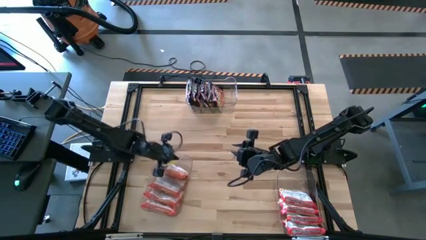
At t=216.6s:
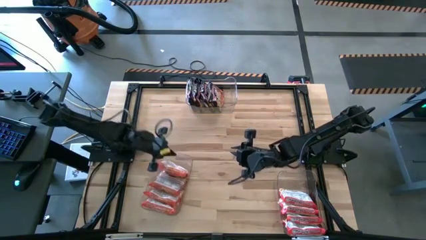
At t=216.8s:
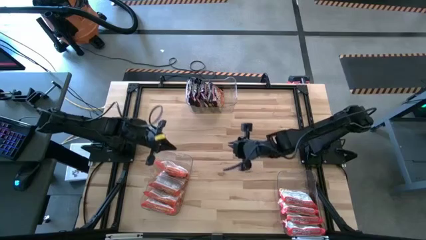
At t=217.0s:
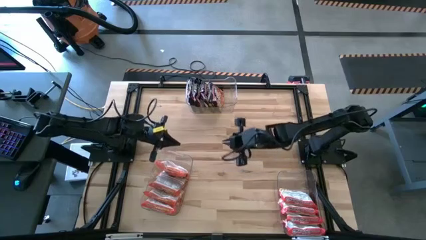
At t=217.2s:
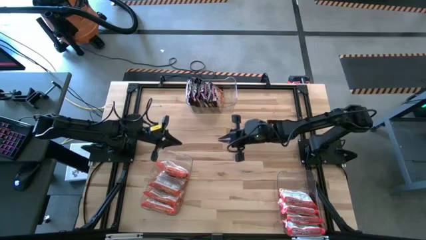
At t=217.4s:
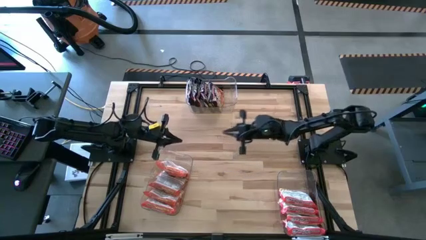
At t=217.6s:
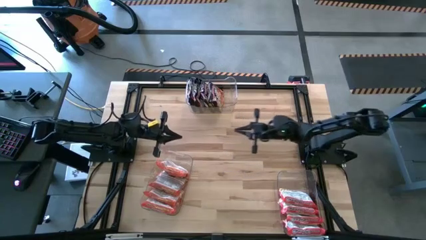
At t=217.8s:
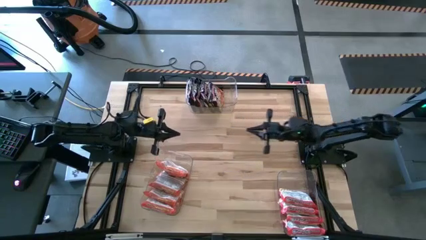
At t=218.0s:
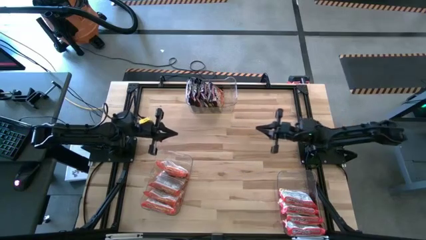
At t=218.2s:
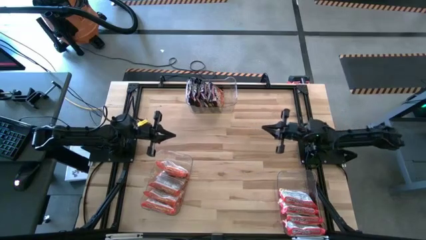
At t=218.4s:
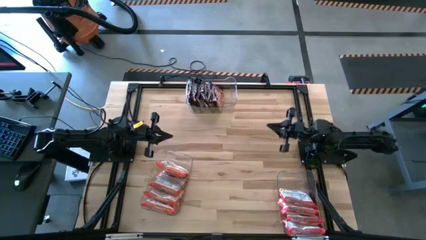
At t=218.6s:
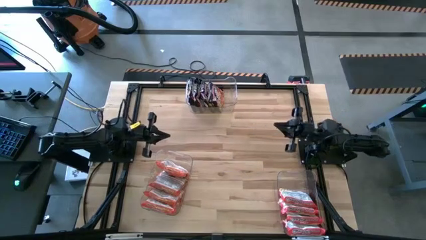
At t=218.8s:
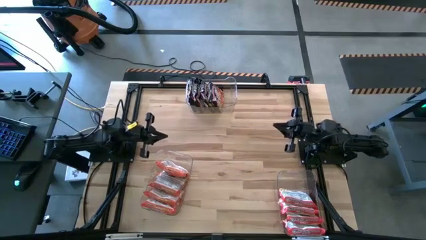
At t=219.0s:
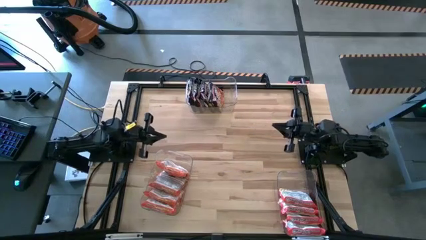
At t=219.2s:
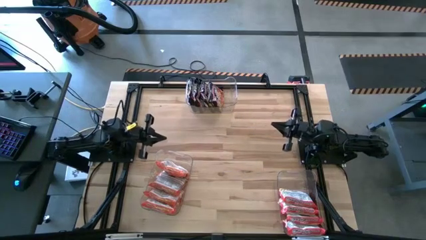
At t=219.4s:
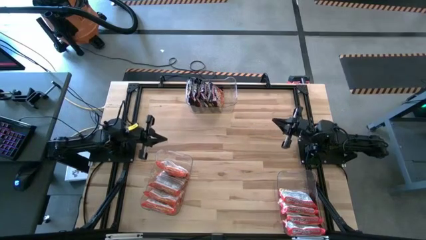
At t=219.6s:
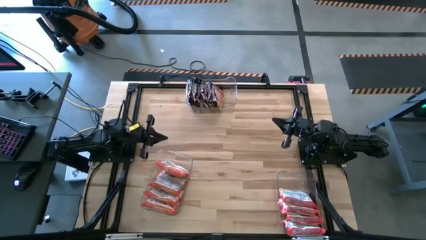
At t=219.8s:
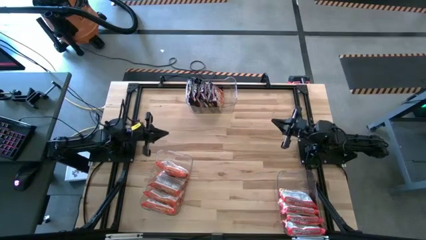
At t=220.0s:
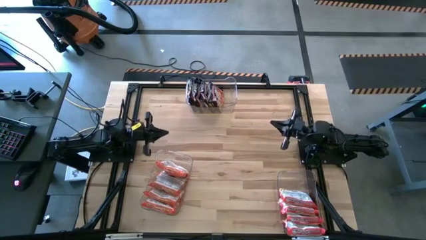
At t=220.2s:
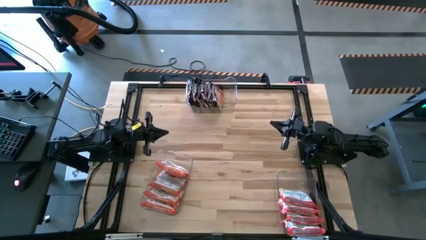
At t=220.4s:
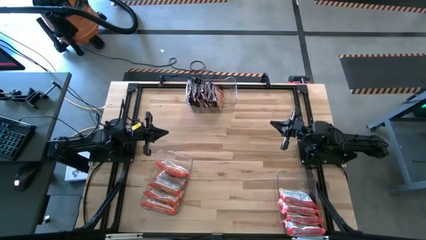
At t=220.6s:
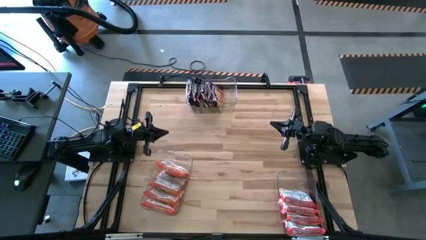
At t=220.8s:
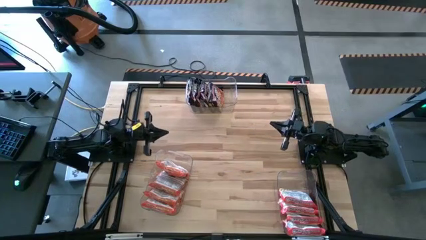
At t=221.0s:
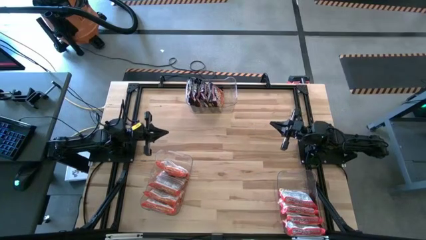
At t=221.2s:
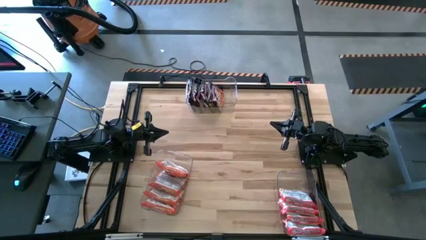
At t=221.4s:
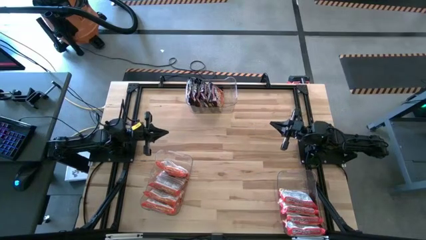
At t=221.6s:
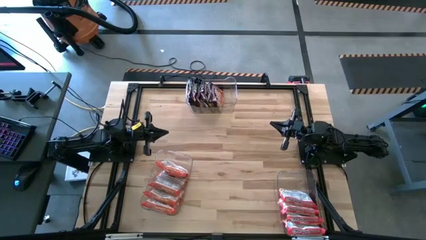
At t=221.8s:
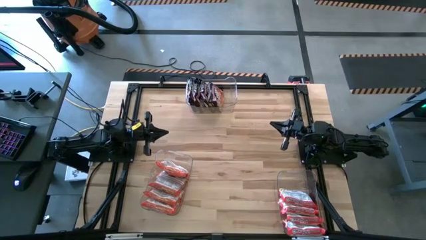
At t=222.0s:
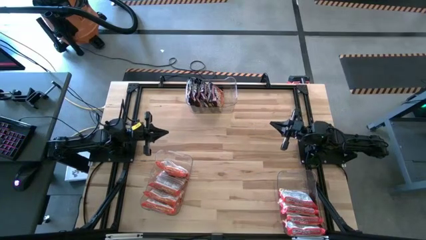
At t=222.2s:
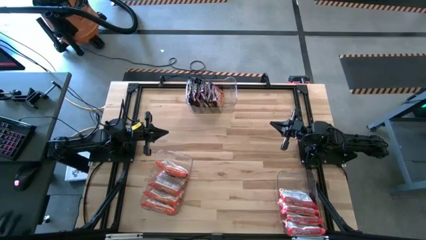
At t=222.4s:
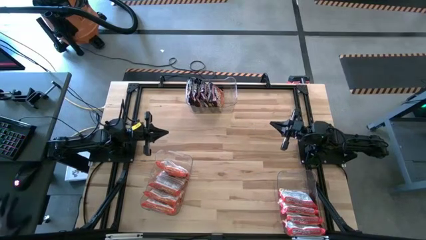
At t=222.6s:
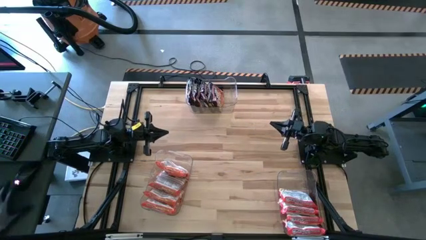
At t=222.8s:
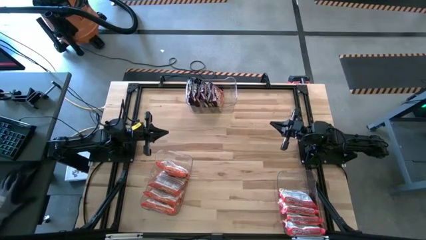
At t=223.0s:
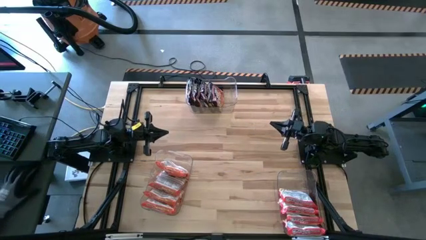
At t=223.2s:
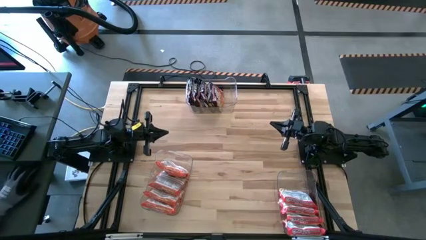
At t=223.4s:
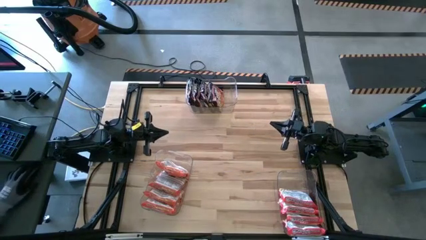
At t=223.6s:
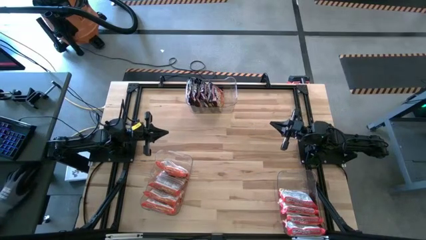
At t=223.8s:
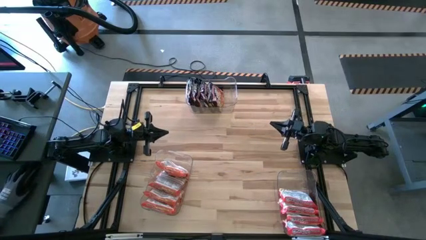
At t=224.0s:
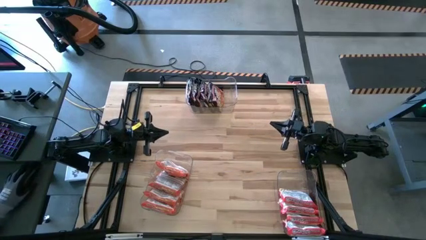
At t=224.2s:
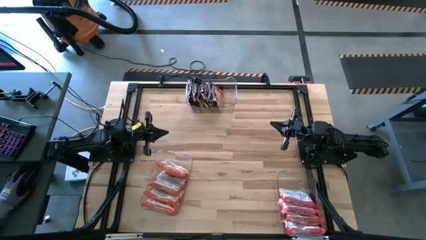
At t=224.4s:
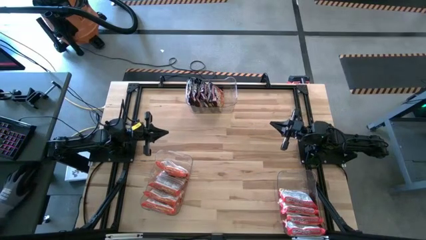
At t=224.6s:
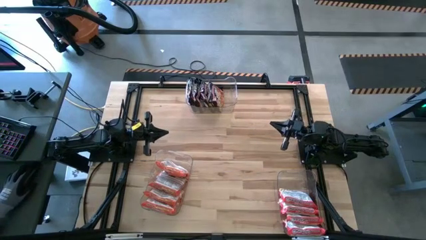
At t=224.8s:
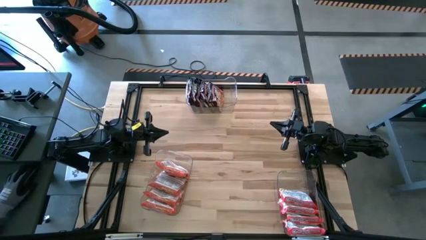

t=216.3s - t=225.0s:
Task: Sort Maruchan noodles
Return to Home Position

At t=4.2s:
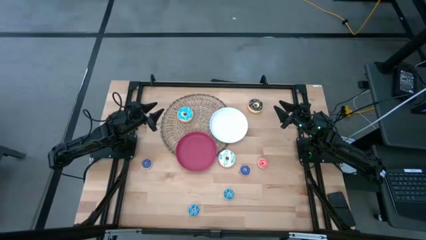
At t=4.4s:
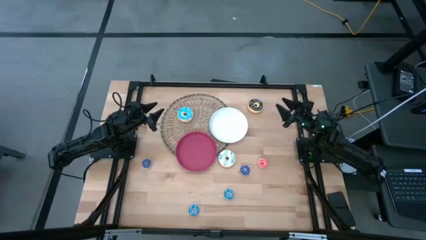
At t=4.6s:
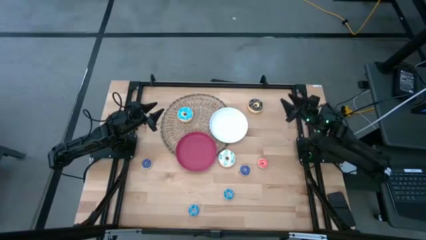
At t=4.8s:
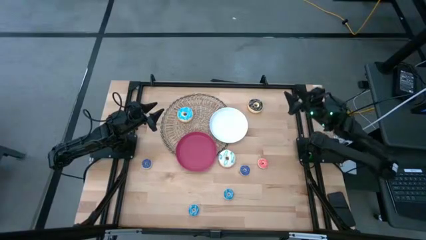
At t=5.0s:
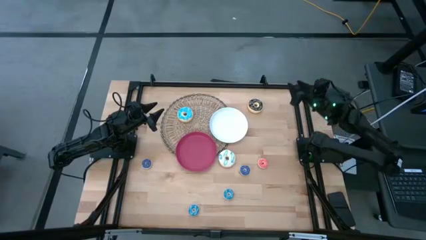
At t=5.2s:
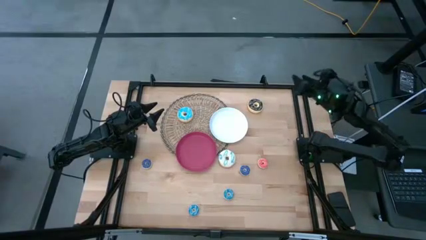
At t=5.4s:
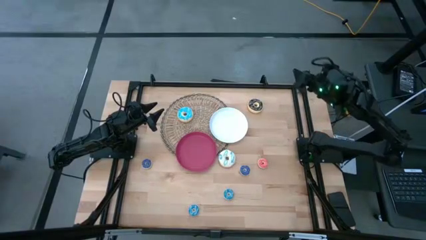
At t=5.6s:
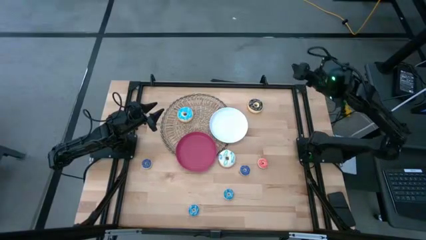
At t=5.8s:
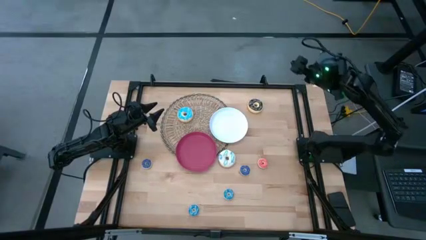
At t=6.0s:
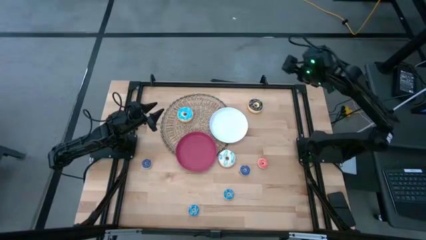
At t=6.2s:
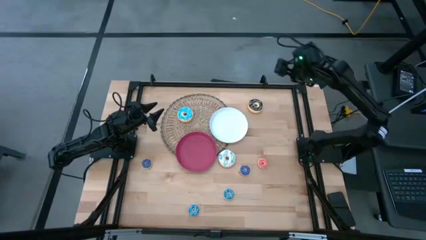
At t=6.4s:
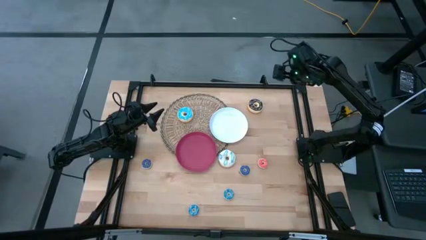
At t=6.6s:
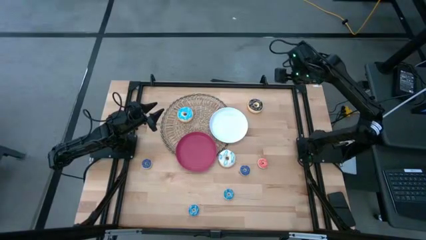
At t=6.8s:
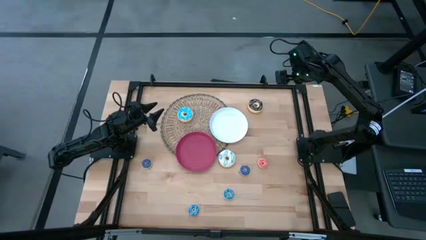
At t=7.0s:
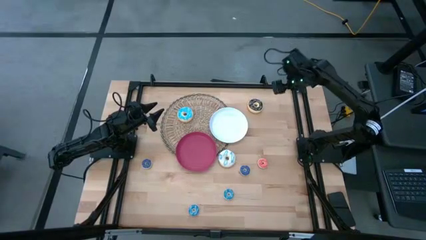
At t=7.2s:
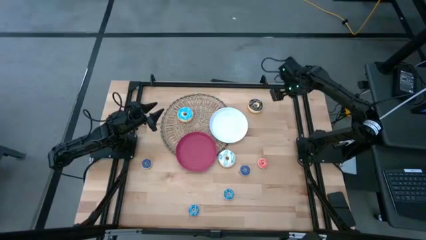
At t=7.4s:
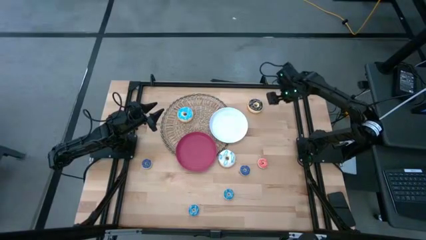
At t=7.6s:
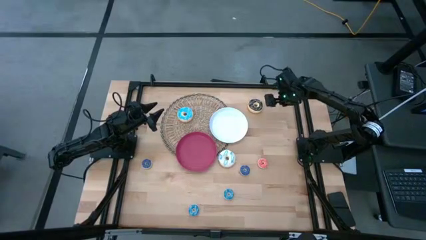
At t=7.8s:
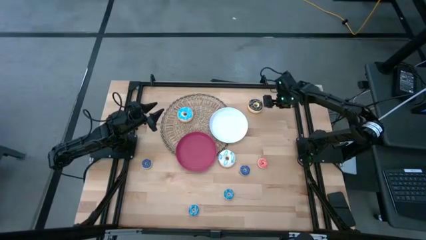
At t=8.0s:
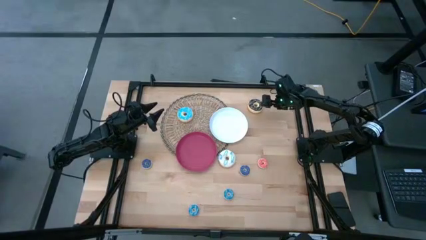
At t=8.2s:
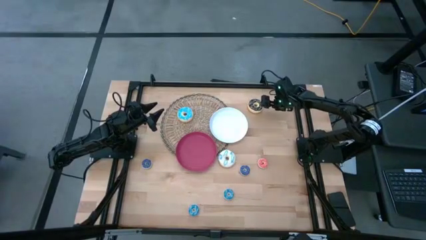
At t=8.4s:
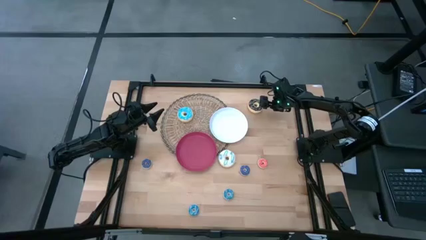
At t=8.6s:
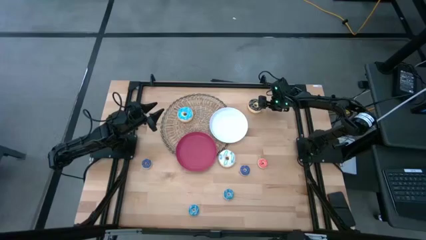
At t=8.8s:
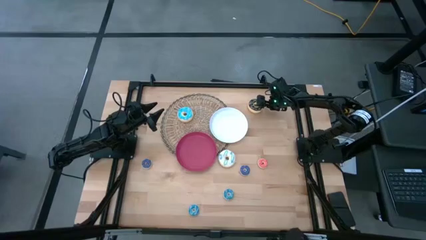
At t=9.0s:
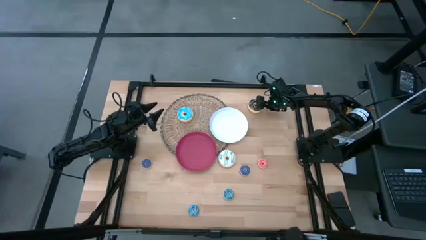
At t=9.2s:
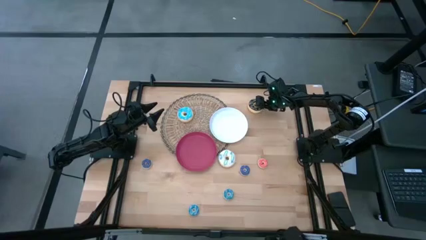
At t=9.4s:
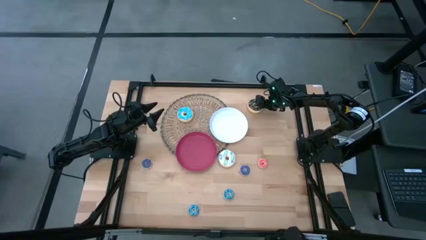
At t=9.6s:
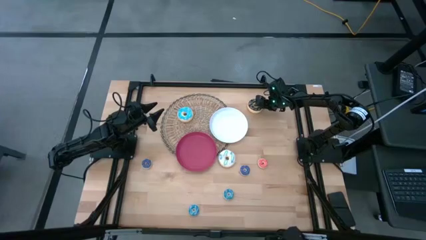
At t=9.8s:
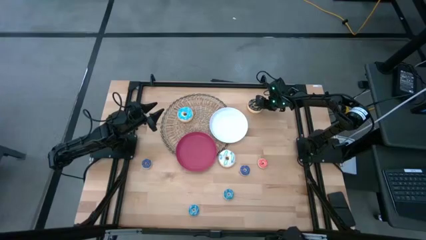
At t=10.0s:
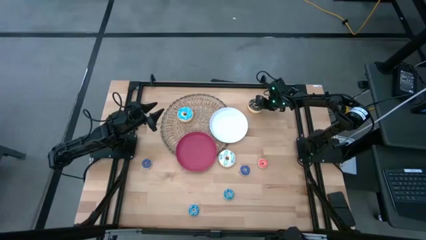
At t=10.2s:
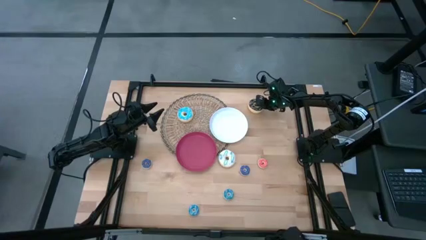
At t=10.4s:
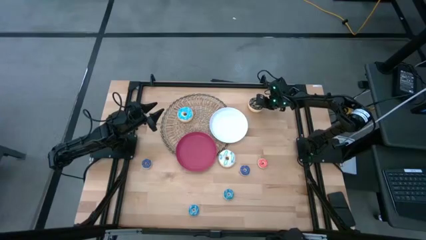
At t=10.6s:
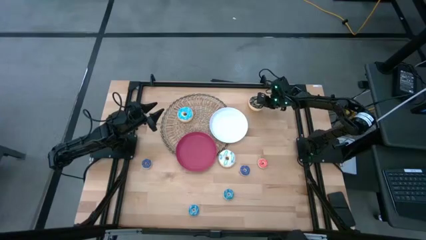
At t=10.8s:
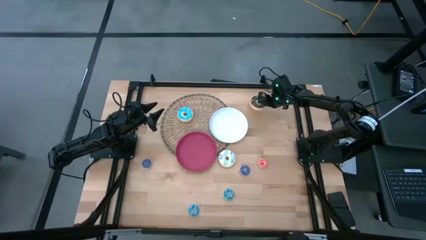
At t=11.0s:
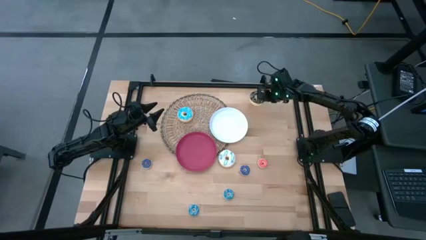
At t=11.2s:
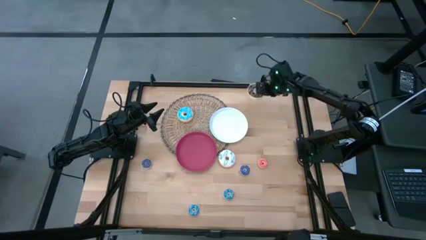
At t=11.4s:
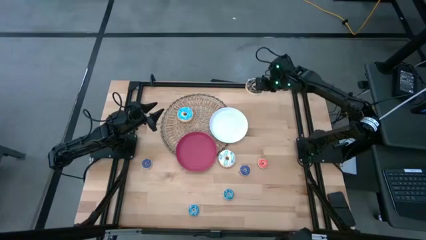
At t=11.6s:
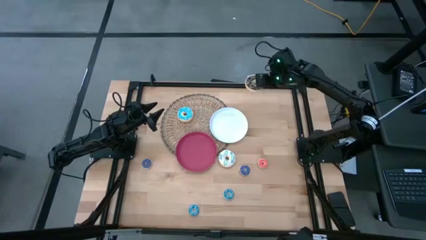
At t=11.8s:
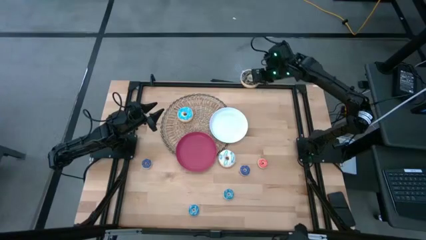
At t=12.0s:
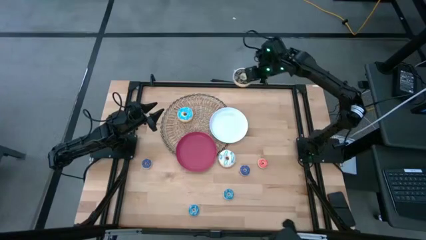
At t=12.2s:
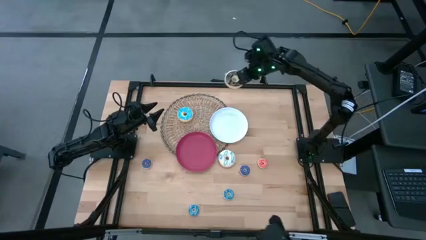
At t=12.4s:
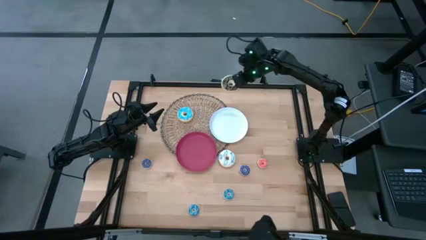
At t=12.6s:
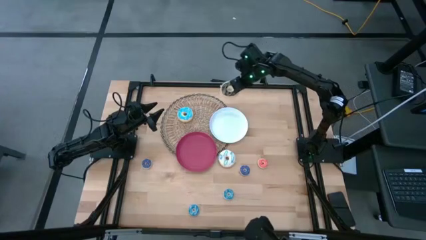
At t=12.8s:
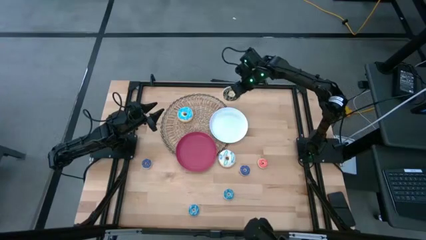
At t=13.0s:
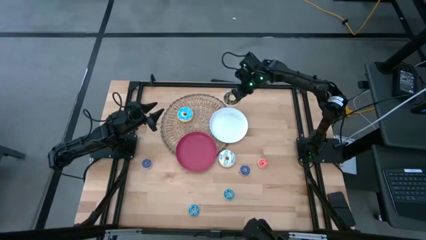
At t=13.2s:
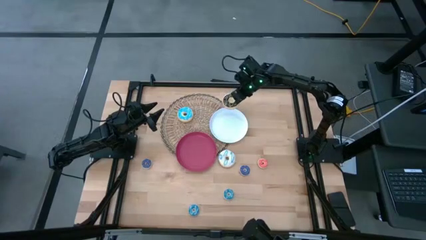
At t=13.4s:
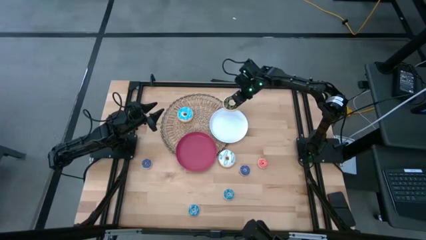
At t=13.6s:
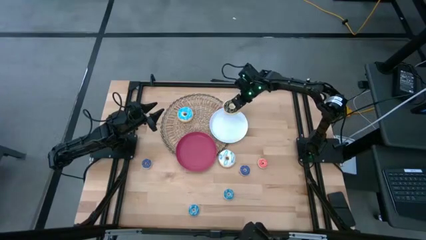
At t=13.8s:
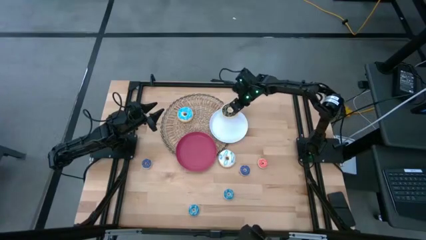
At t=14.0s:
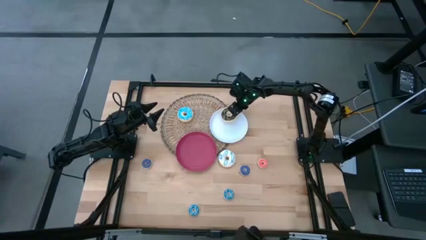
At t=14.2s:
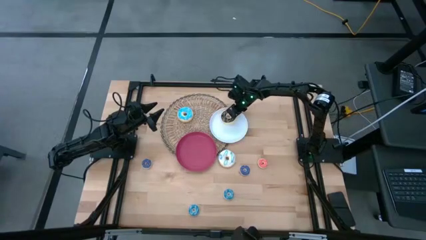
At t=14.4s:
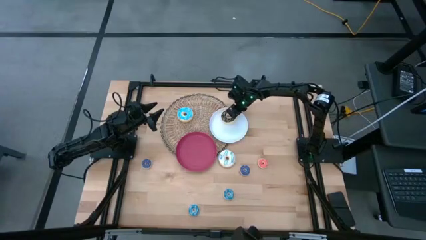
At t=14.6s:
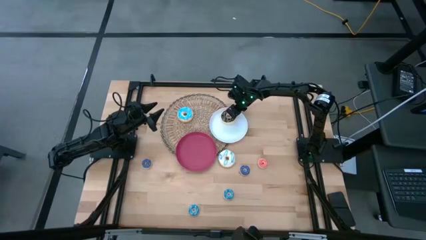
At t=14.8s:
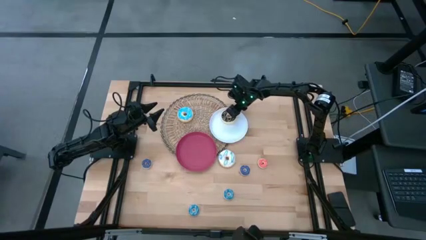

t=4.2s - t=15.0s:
Task: Pick & Place donuts
Put the black donut on the white plate
